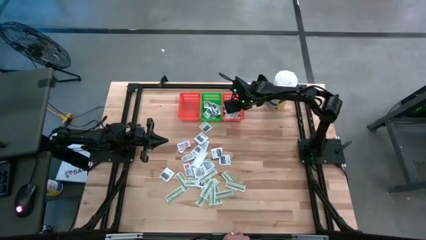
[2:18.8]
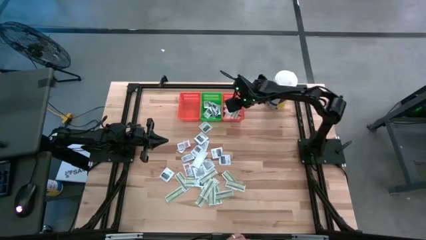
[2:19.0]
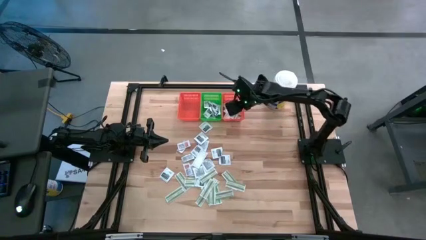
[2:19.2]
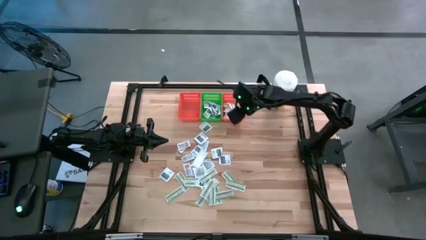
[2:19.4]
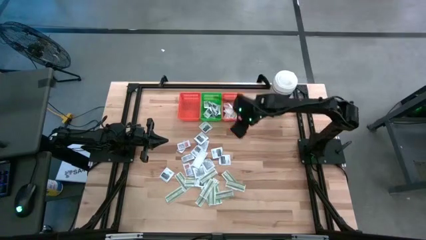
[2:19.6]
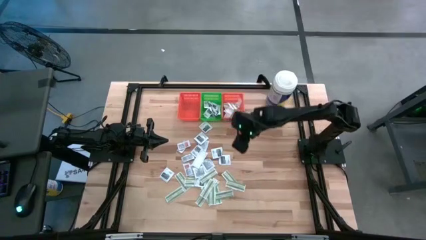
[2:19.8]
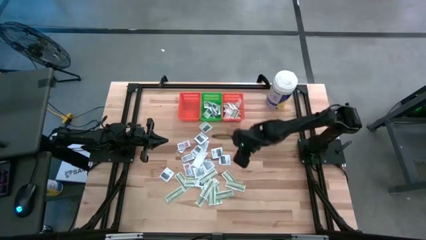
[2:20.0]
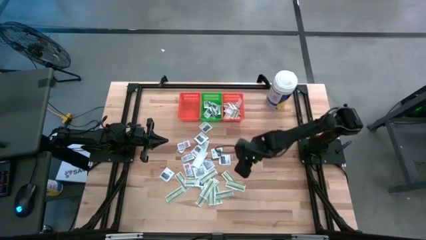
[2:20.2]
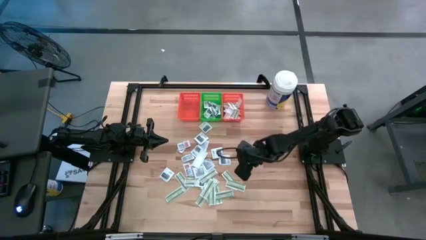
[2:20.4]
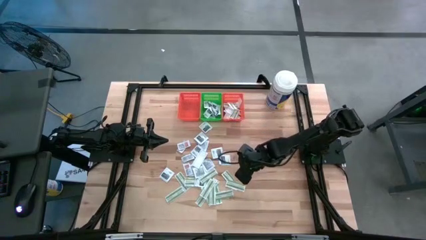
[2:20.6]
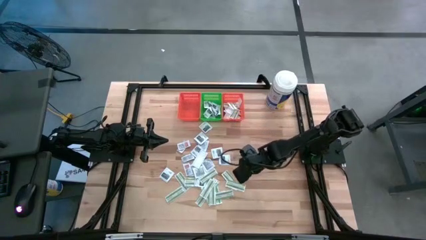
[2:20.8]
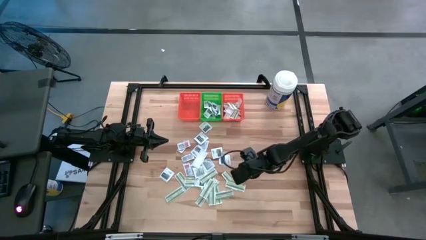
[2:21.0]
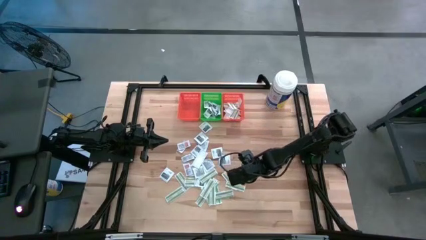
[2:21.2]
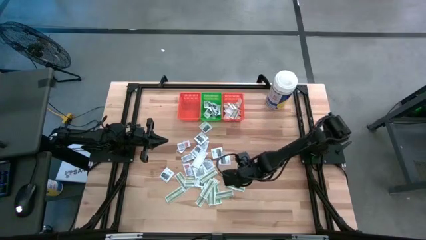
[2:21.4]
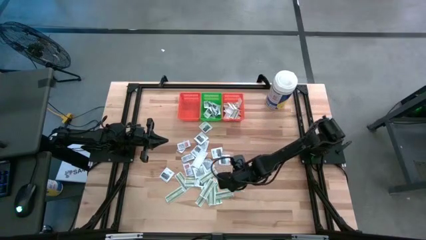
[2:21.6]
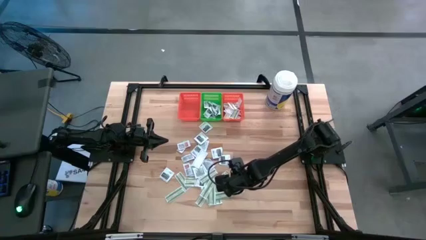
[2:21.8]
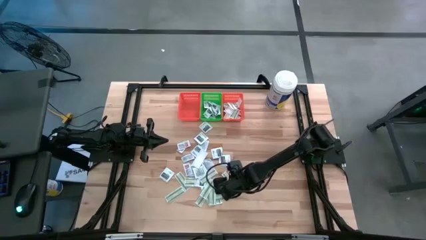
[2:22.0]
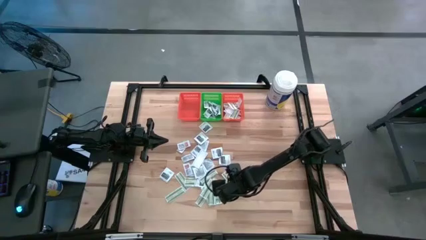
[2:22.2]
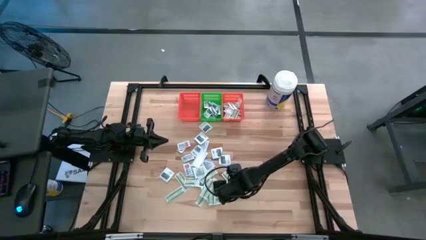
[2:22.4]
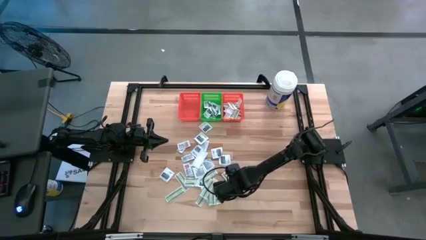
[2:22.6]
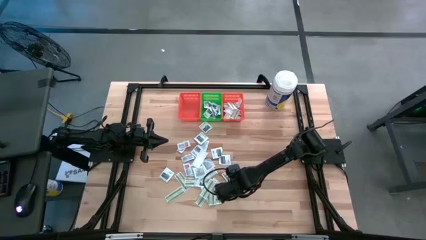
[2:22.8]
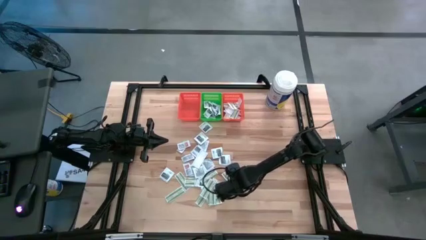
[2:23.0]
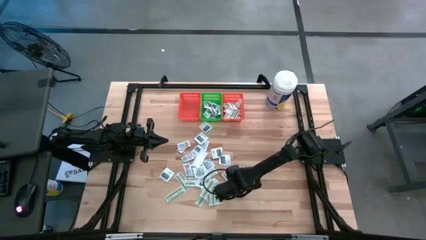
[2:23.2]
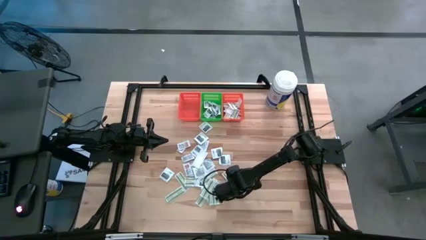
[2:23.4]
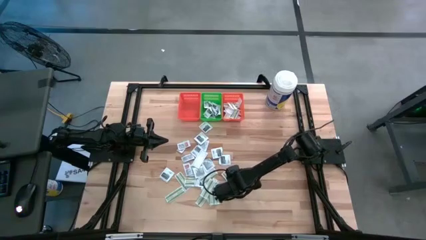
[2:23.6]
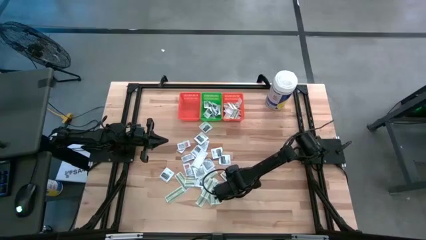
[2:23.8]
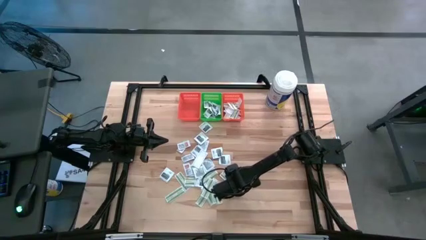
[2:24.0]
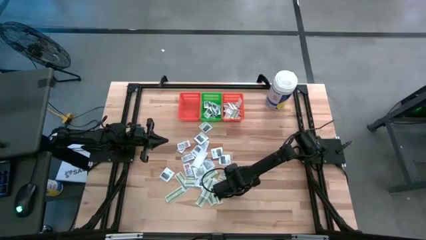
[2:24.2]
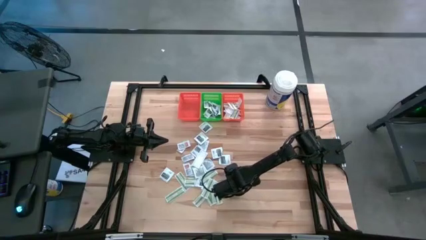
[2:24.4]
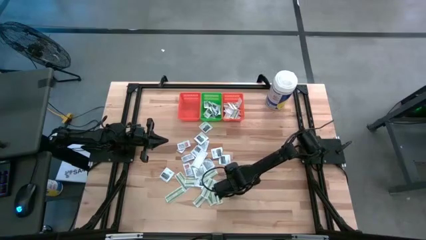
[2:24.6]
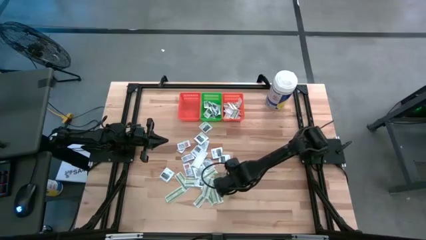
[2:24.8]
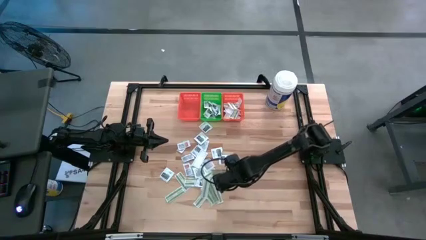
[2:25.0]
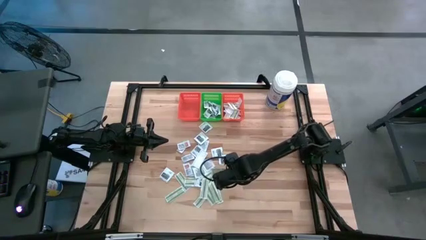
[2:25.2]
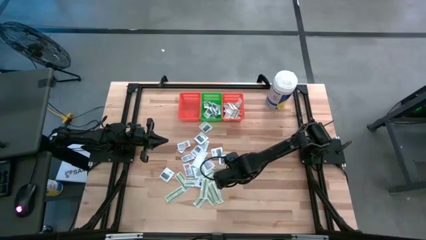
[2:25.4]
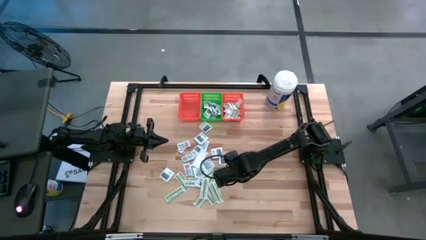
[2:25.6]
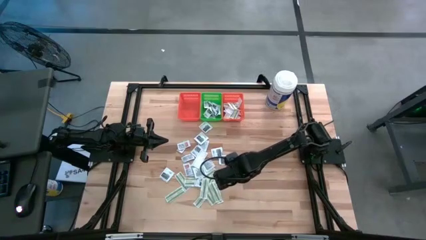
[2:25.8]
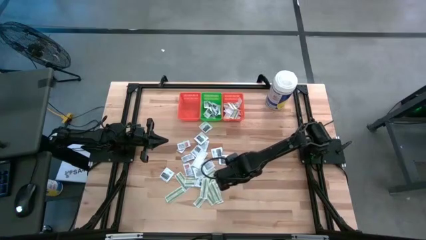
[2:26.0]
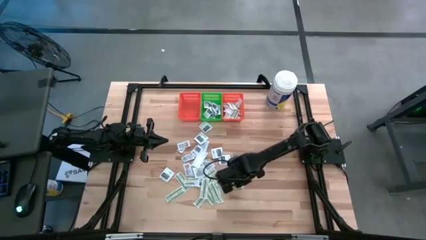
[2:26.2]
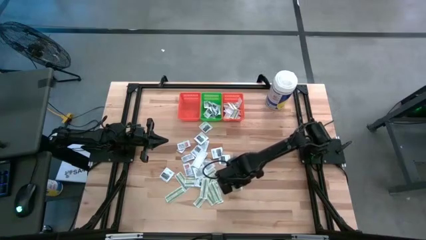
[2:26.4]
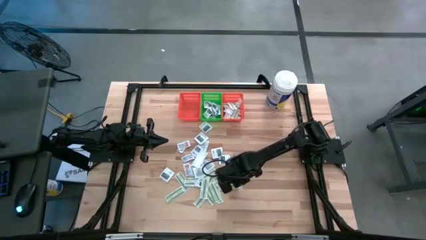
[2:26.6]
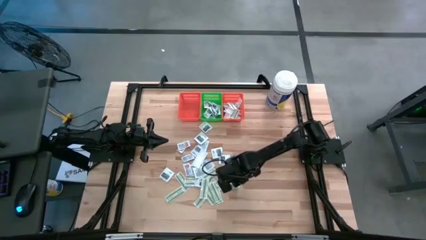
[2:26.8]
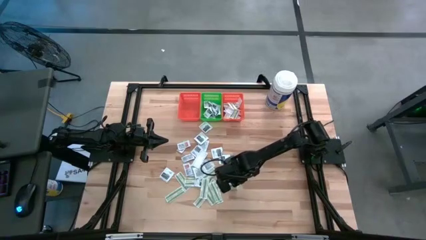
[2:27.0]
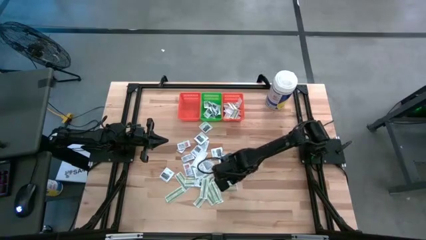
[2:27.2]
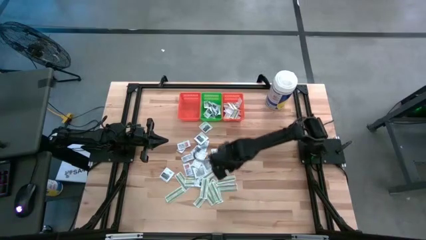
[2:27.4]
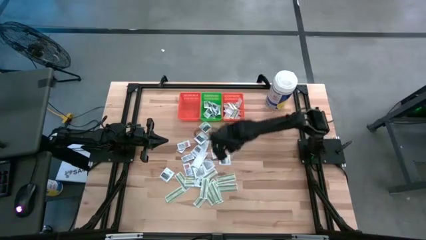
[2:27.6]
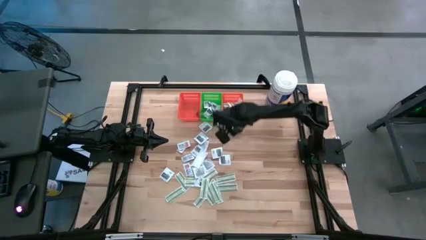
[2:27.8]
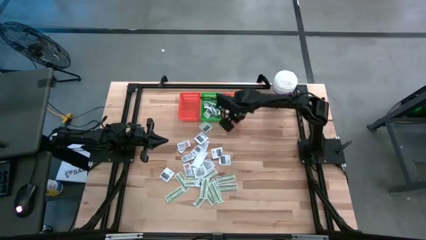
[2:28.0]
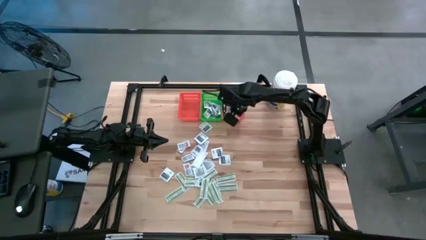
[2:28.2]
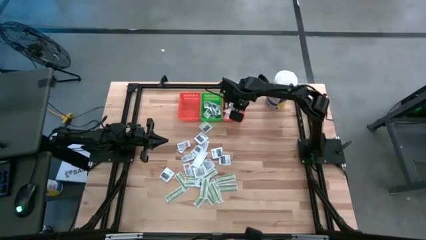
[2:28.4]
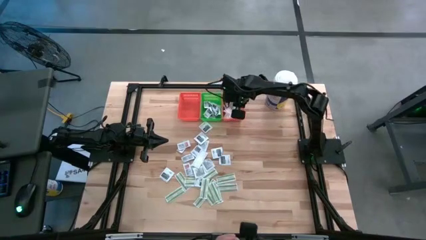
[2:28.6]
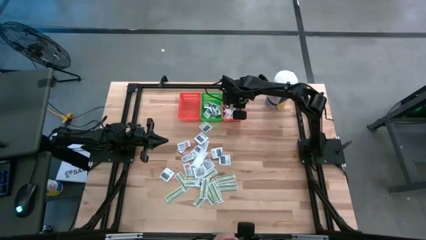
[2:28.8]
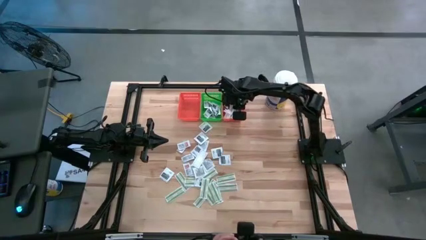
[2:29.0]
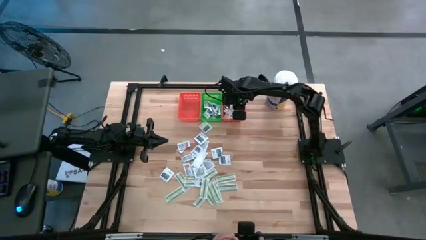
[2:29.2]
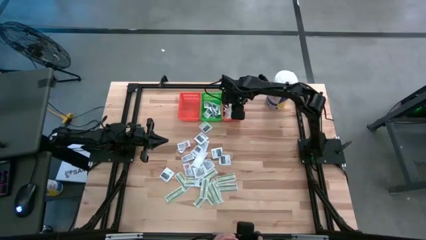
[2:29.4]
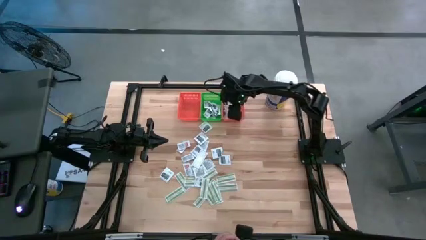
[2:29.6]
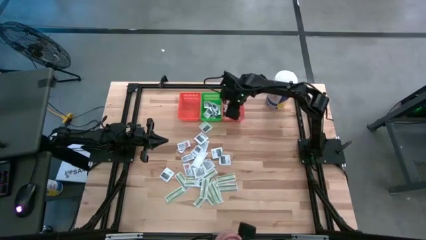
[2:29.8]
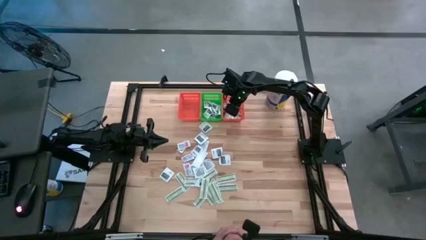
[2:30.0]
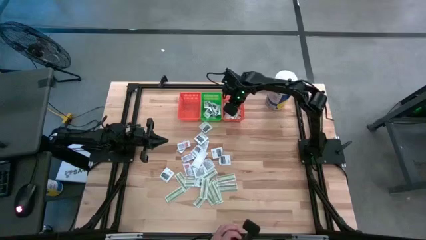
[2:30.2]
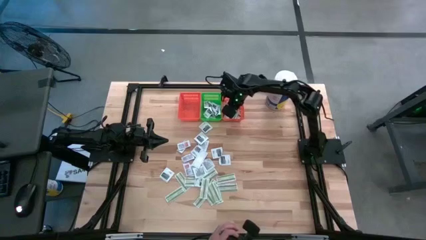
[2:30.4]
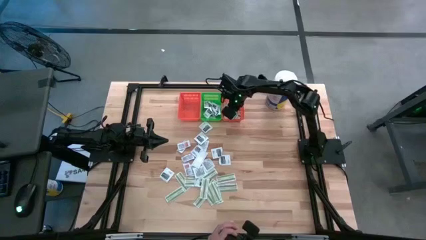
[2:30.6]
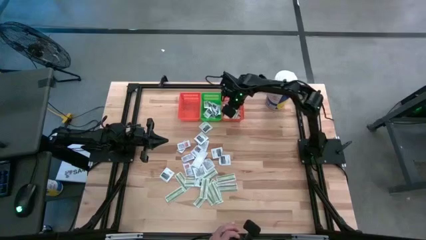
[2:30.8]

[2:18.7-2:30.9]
Task: Pick & Place First Aid Supplies
Put the bandage pack into the right orange bin

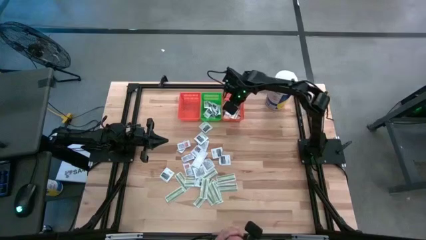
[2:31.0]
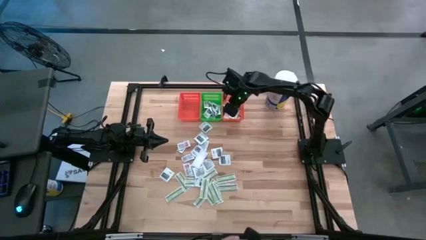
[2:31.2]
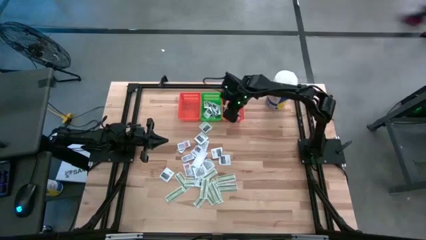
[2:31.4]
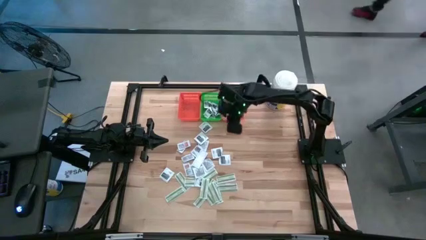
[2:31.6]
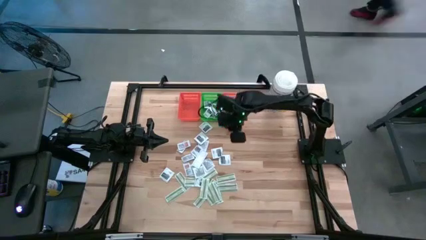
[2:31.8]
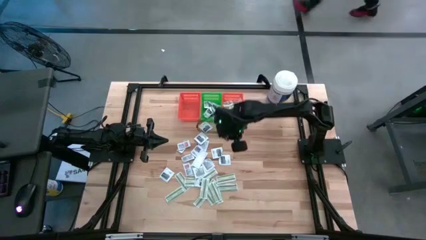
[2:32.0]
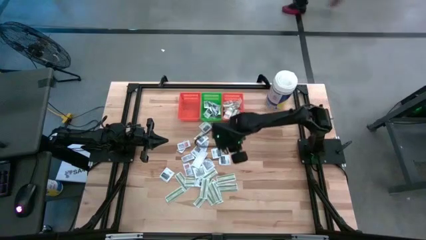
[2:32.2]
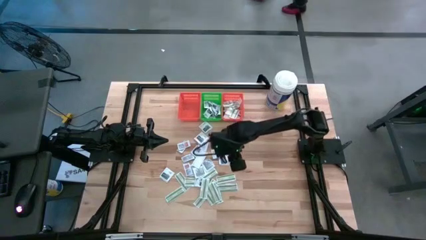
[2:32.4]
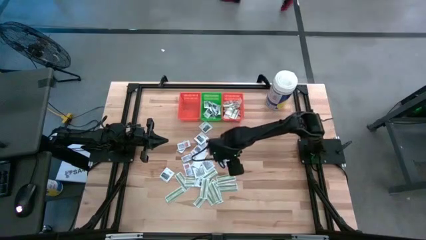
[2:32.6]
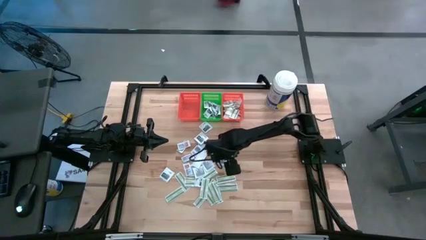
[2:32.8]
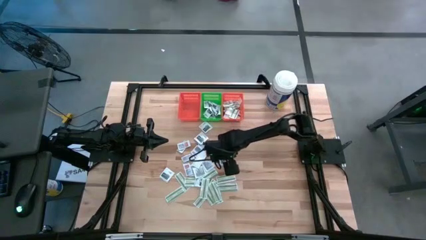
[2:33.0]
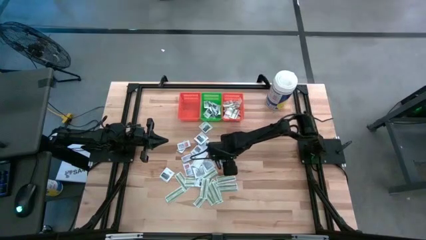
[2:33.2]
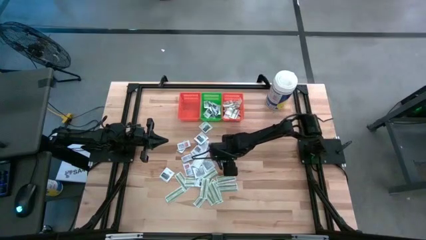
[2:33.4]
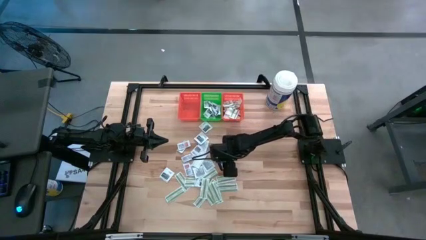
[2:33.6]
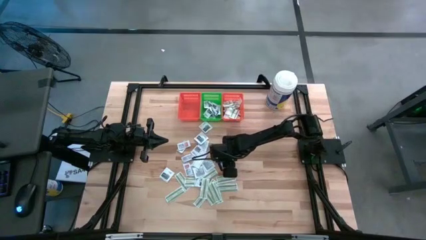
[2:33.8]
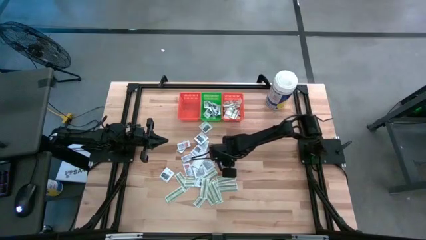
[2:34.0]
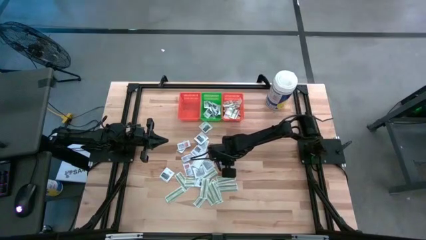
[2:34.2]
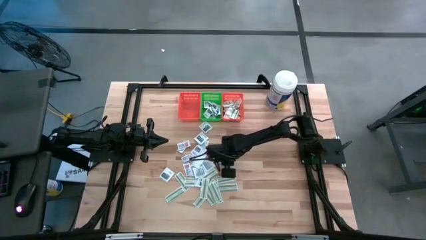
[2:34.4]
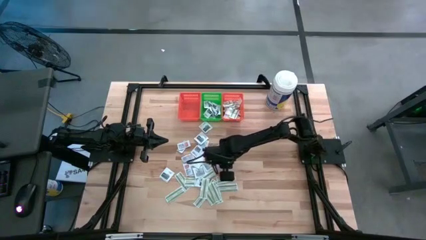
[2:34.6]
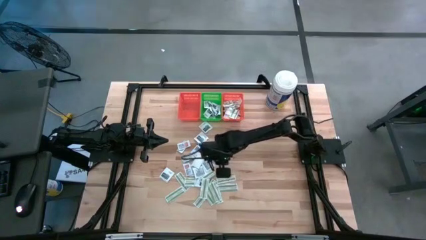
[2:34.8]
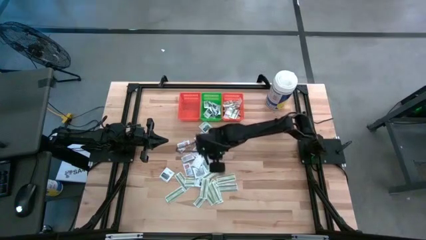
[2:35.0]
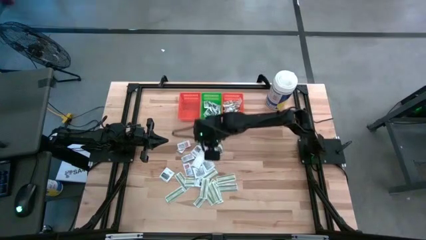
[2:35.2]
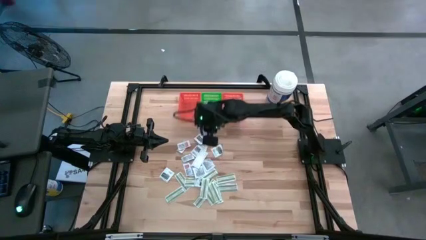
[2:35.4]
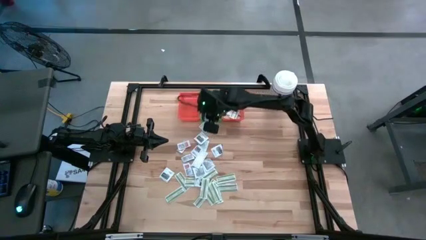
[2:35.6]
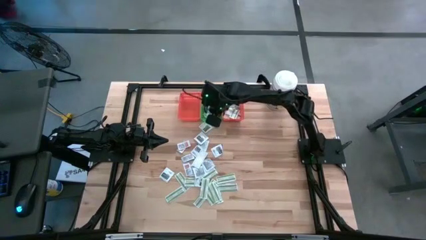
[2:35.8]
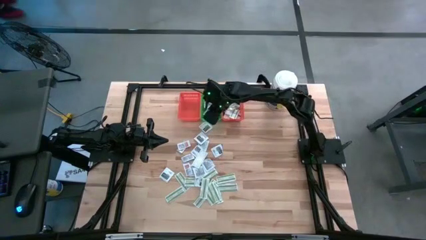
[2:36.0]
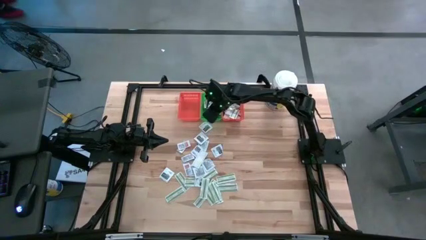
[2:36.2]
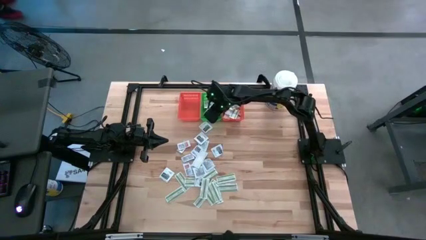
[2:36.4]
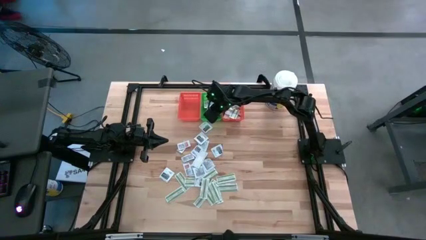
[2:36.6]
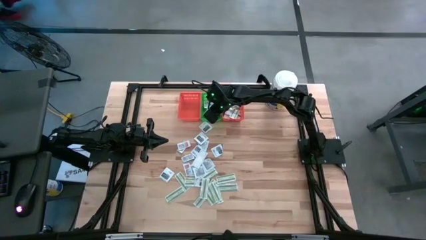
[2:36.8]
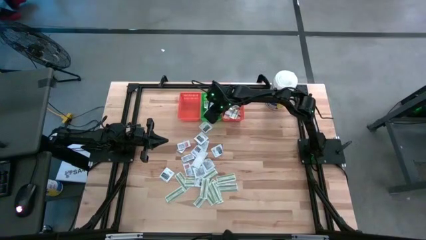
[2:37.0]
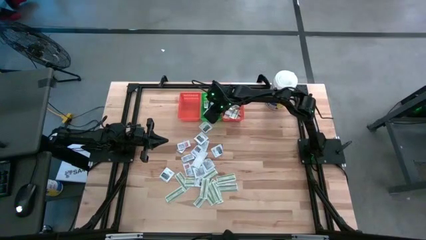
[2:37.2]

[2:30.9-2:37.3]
Put the towelette pack into the green bin
